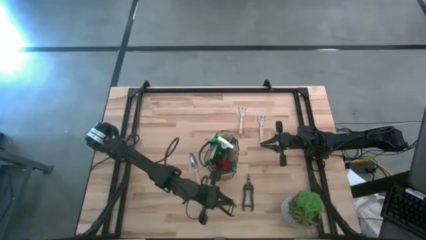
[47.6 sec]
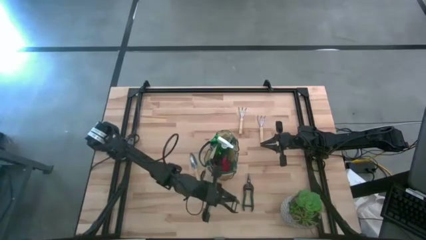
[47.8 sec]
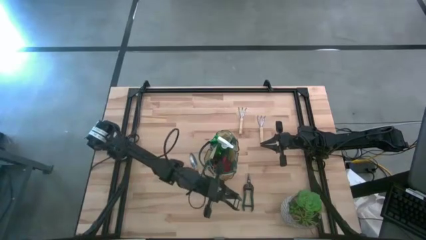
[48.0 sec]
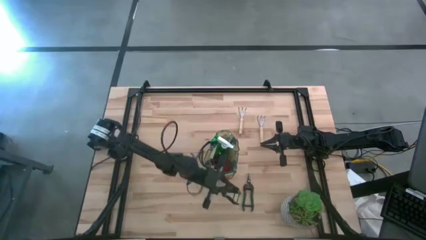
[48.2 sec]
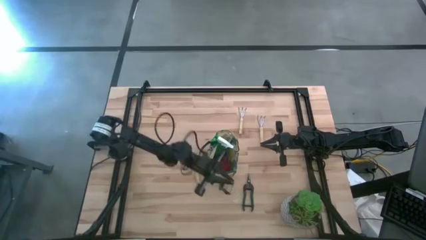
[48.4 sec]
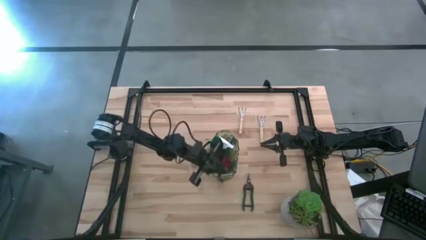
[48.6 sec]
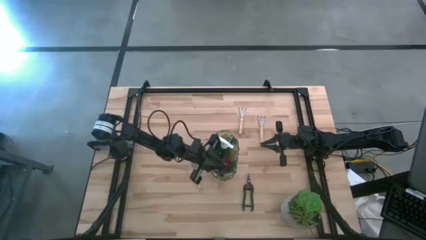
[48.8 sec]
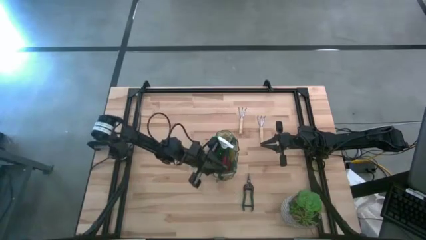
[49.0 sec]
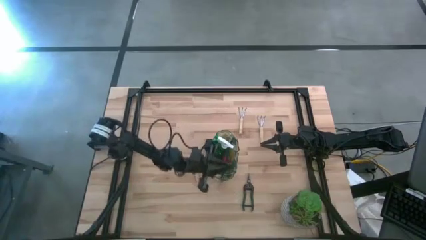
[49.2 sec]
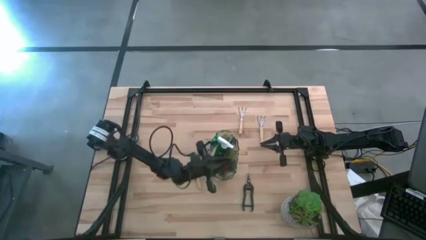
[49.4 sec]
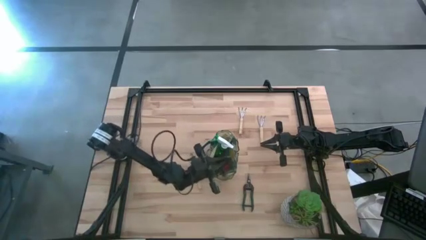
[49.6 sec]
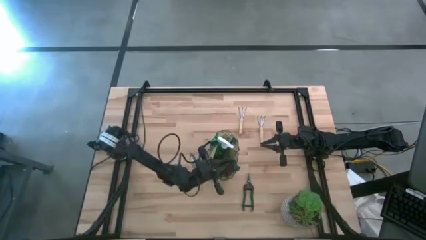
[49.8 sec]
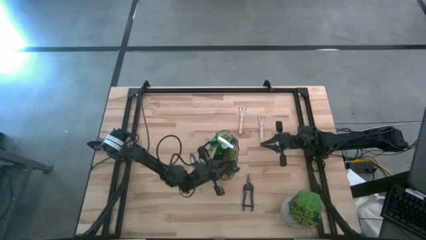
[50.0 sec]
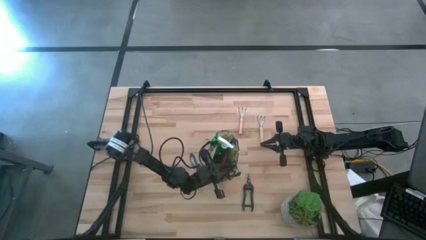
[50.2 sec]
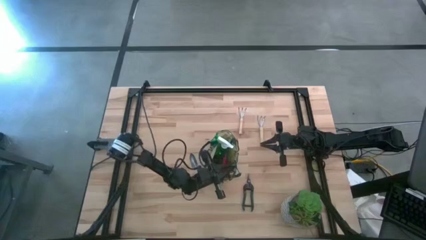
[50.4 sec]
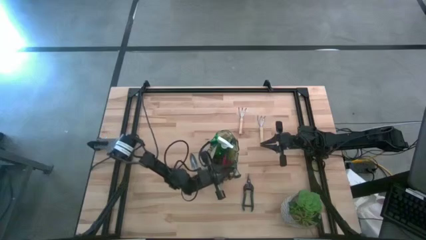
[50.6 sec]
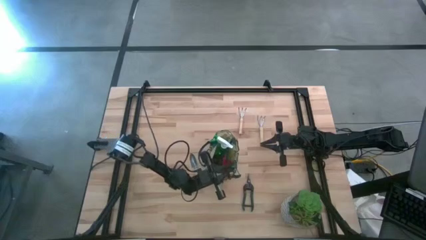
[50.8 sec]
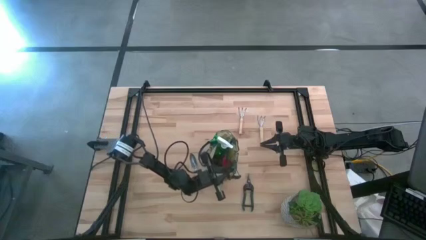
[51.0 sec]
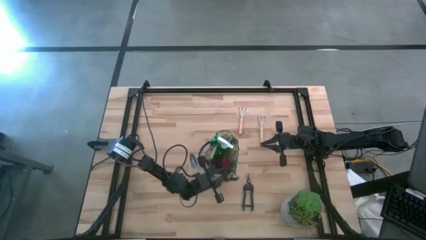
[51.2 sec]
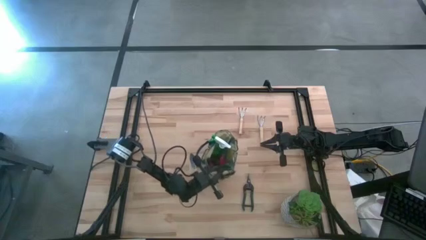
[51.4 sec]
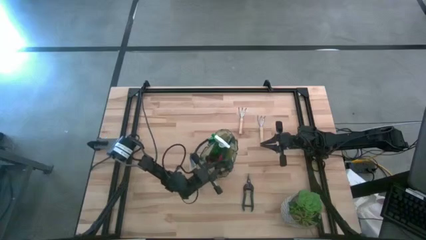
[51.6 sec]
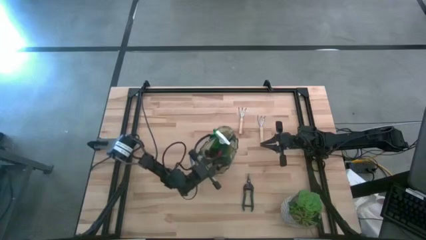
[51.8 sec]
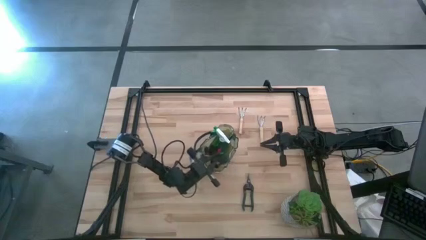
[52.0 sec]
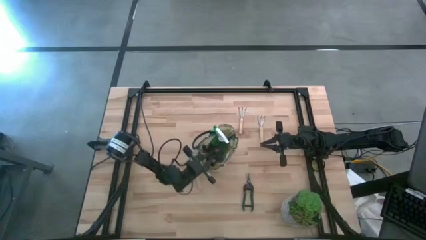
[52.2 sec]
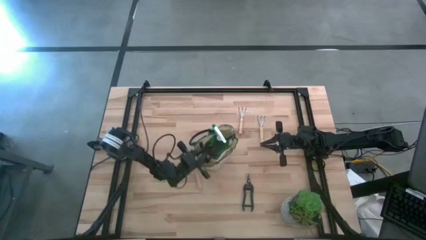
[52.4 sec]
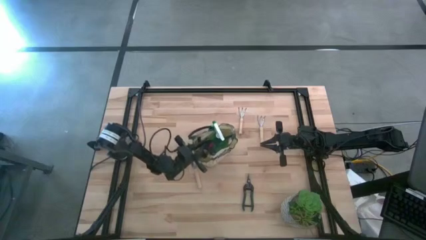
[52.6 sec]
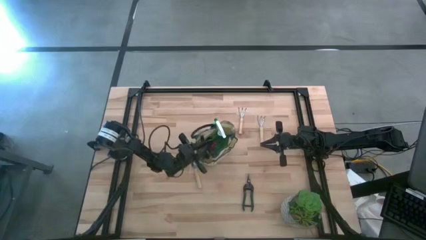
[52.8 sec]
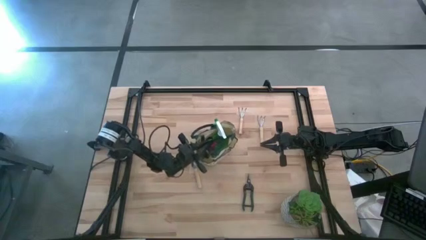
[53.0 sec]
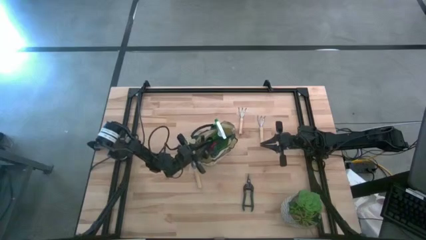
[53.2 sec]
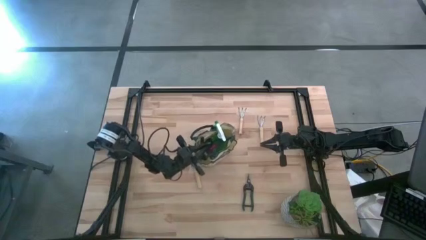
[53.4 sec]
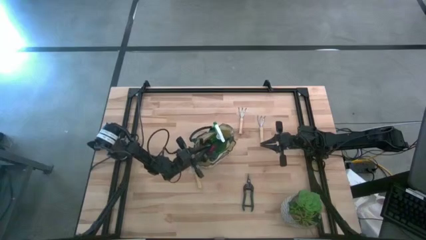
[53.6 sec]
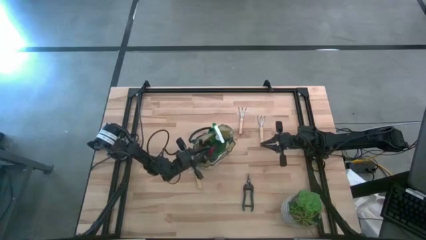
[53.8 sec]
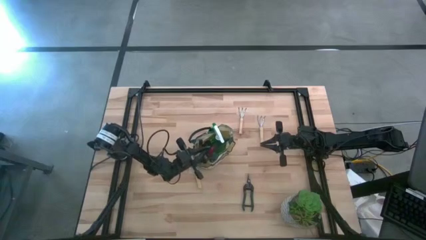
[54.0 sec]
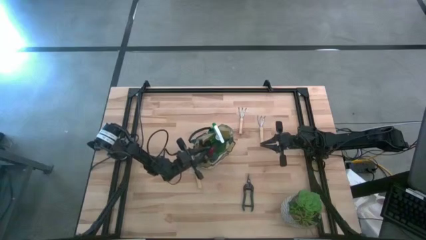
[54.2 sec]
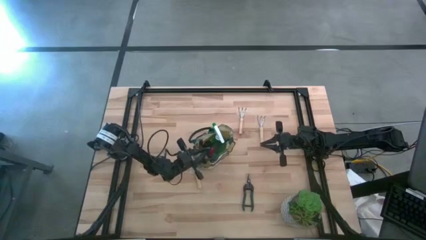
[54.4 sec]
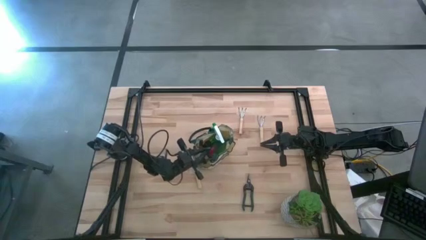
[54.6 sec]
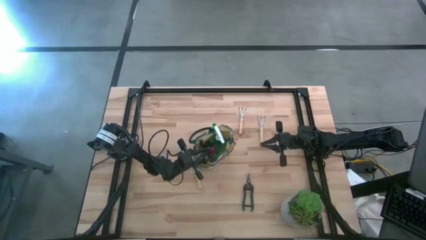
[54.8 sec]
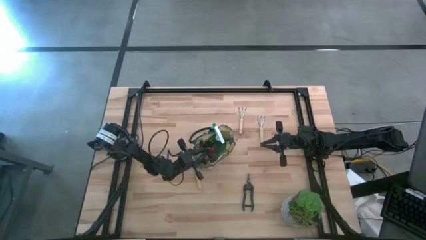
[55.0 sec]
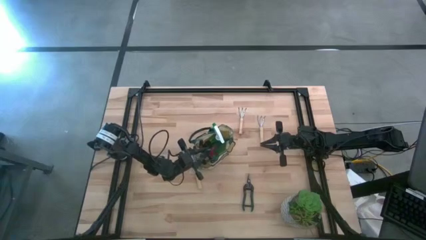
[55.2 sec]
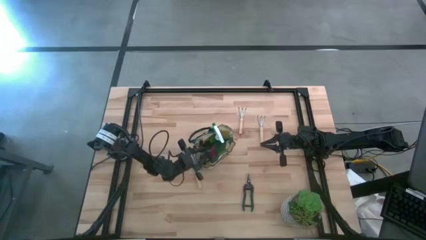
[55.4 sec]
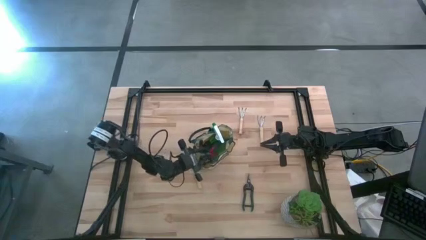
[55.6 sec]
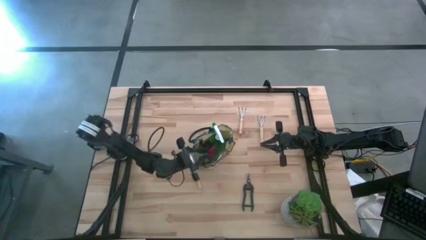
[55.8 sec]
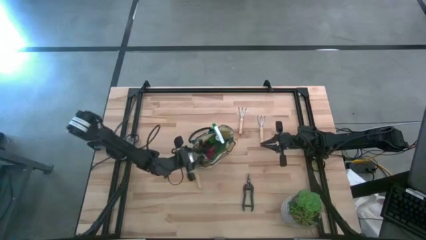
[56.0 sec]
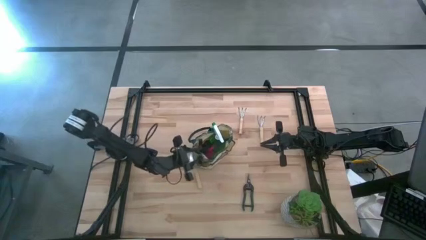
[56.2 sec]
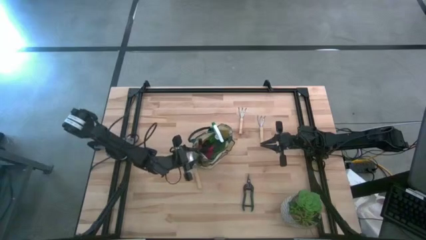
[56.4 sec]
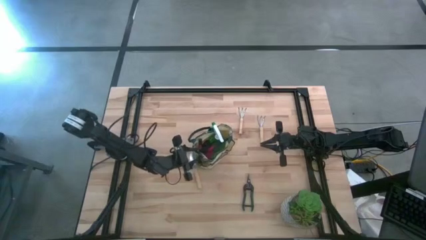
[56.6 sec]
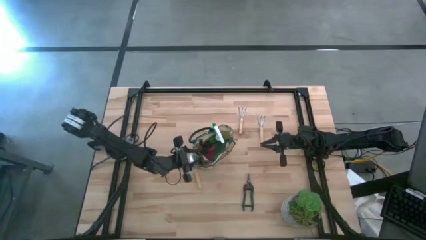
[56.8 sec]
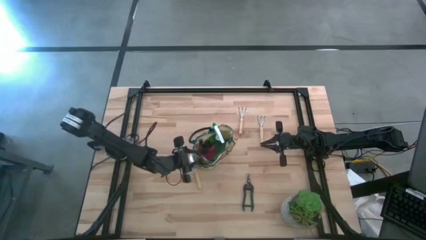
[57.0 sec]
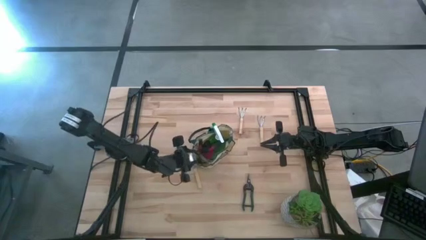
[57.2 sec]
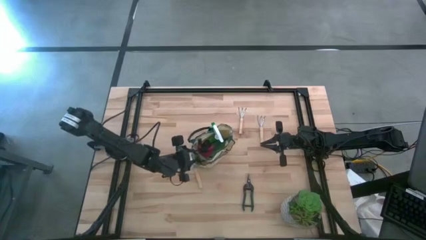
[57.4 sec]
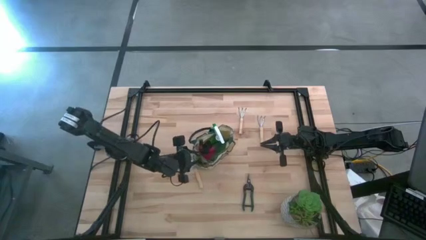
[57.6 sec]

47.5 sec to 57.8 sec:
Task: Pick & Place Garden tools in Gardening bag
Put the left green shear scissors into the white gardening bag

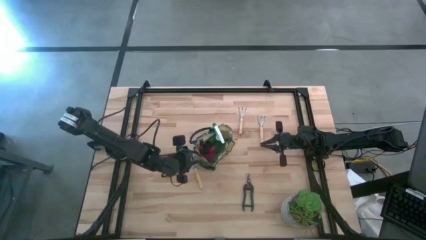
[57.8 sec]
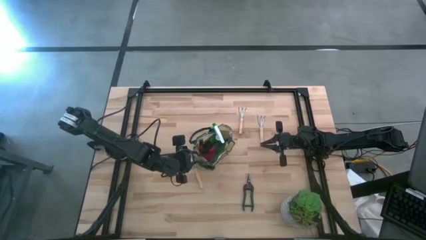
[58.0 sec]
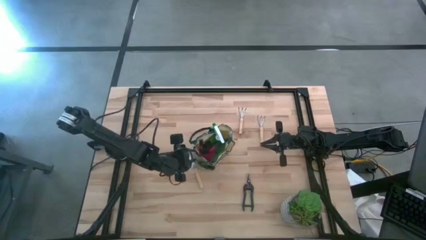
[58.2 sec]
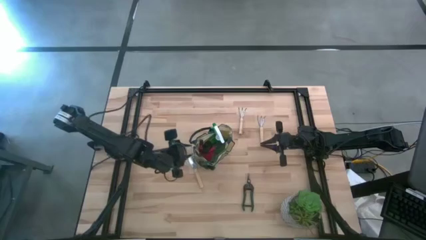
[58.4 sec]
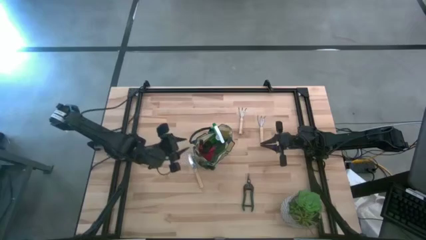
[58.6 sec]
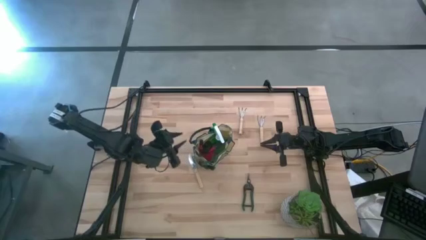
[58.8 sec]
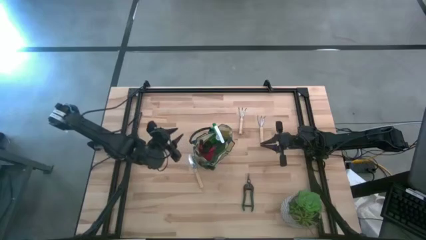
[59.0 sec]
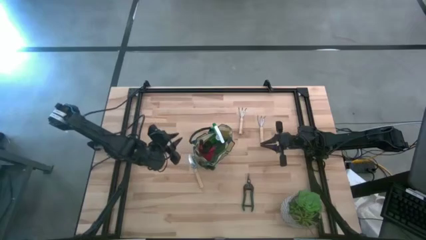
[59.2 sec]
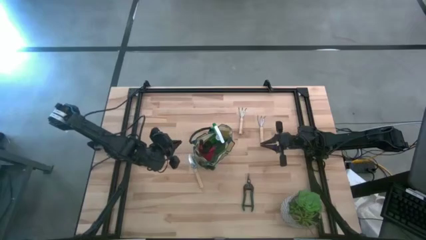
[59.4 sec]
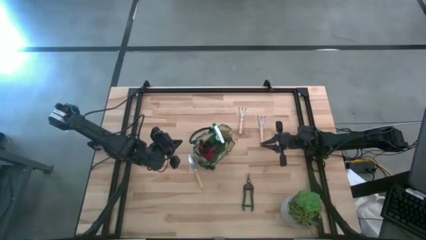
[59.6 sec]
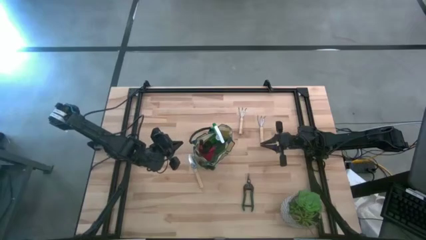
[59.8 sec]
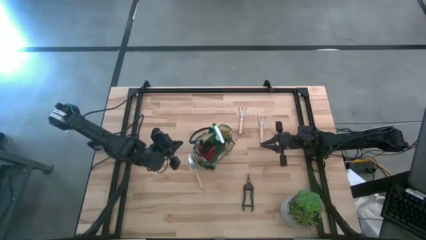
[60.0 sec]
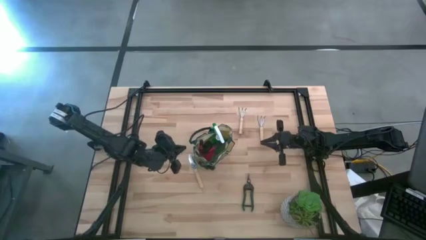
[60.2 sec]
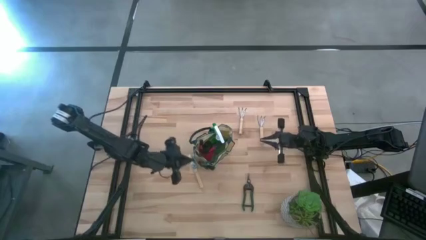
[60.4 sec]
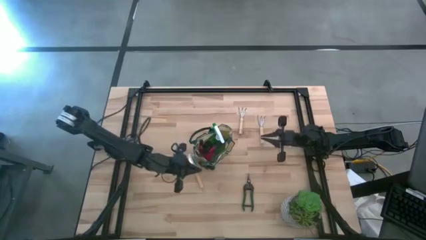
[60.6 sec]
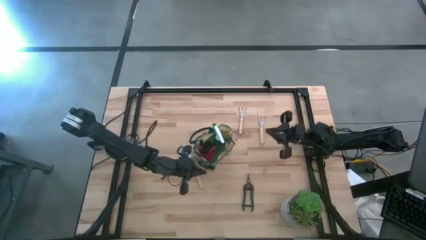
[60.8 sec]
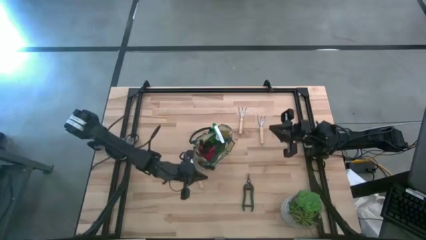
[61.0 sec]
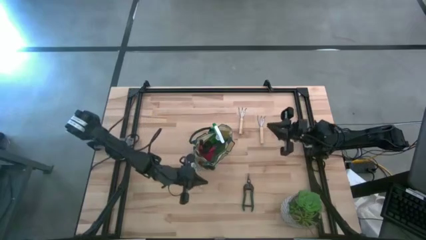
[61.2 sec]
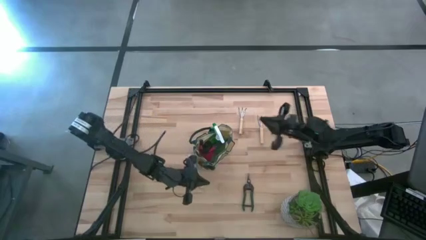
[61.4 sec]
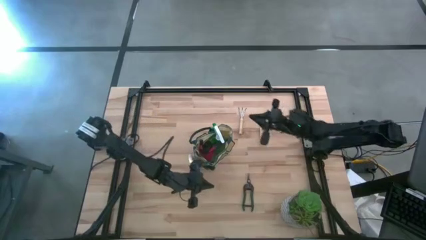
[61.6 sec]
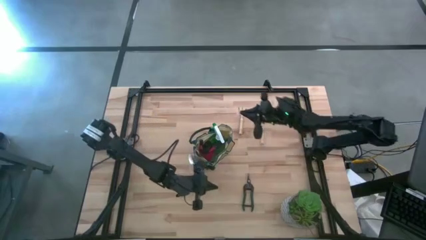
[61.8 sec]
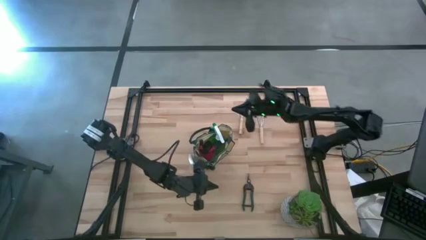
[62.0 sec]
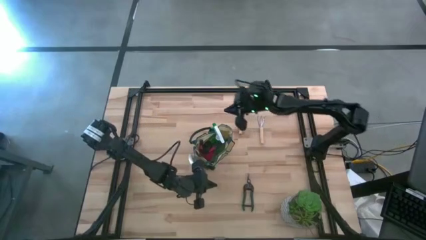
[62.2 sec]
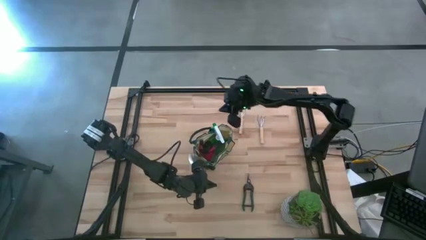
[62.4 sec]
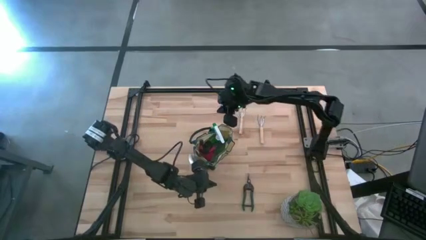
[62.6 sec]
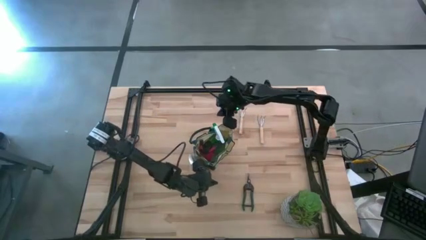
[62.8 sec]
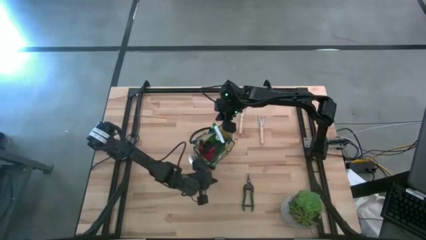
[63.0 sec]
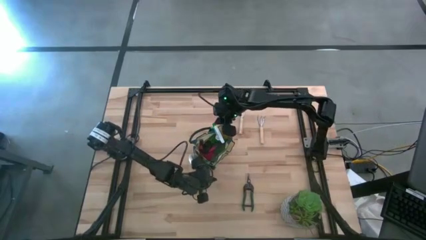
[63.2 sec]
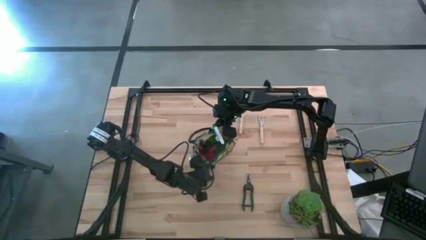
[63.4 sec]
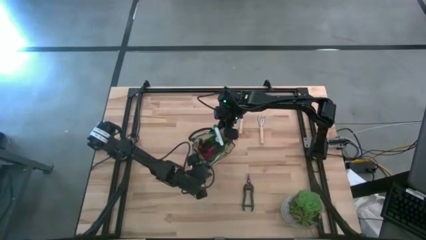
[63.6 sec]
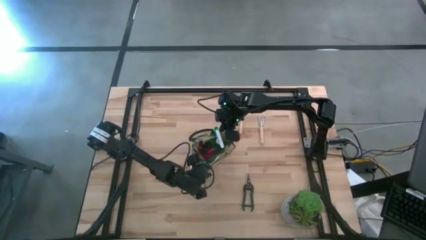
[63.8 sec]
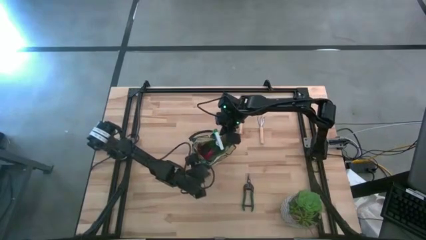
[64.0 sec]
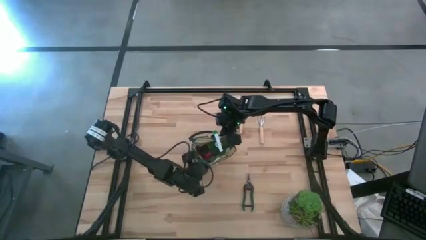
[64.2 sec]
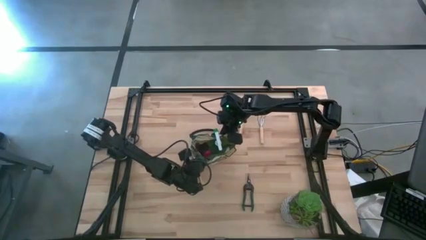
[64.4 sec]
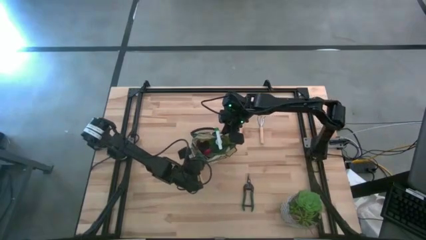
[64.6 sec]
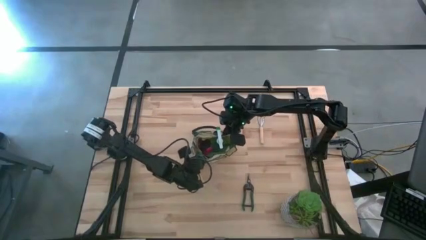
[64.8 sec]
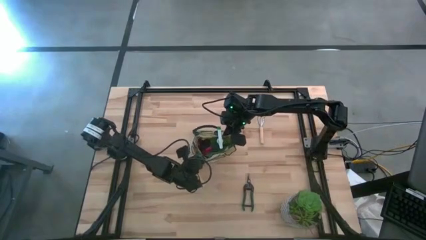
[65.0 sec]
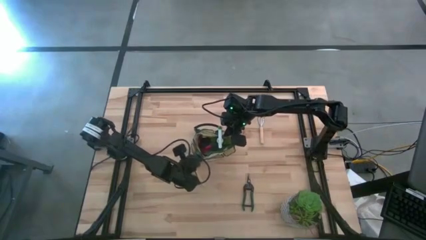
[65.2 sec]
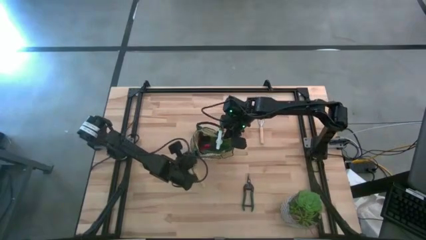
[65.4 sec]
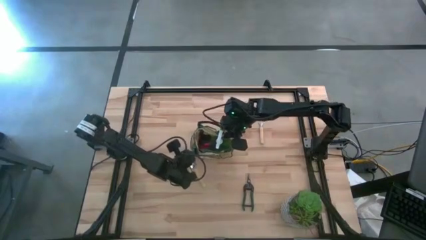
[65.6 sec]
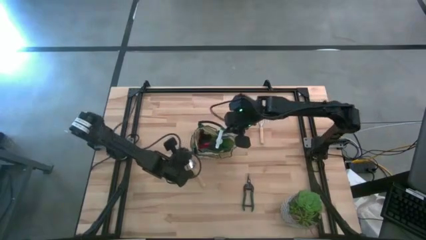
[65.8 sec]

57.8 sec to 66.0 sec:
Adjust the white gardening bag
